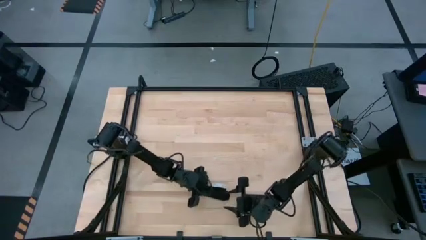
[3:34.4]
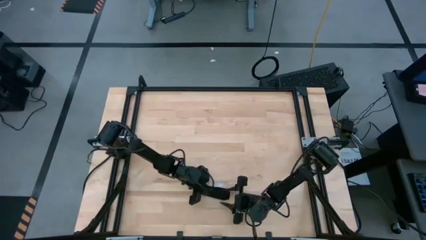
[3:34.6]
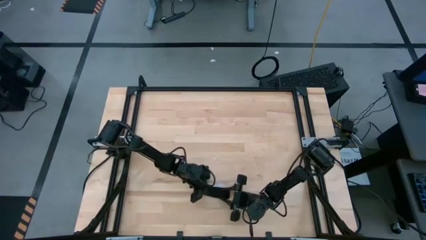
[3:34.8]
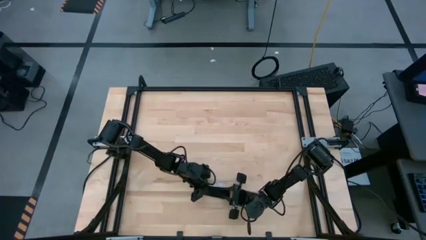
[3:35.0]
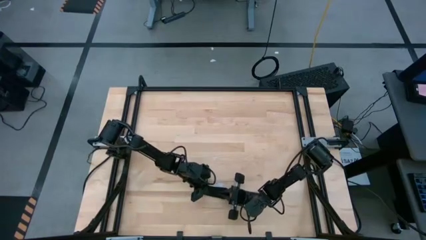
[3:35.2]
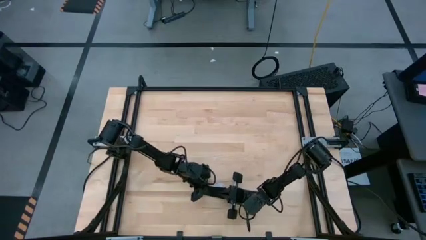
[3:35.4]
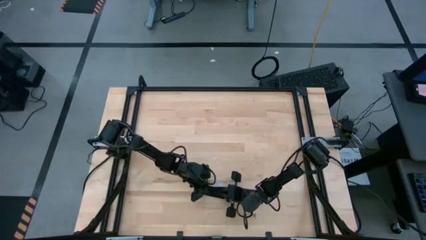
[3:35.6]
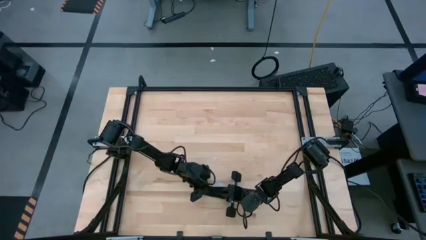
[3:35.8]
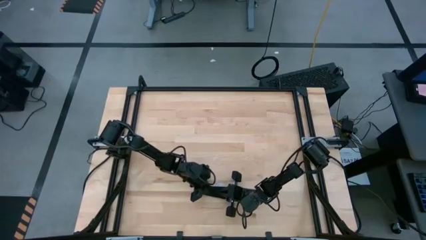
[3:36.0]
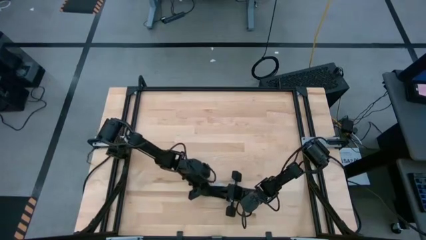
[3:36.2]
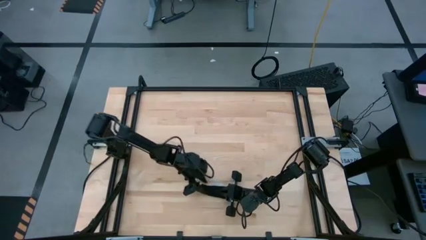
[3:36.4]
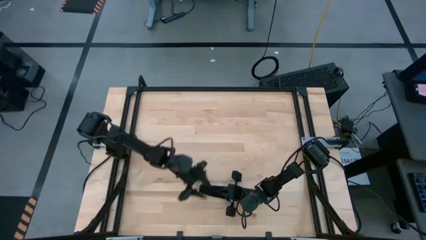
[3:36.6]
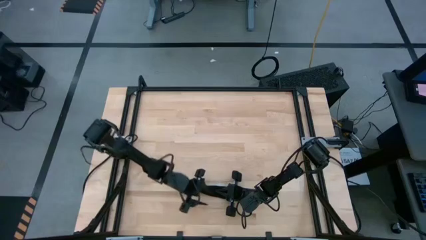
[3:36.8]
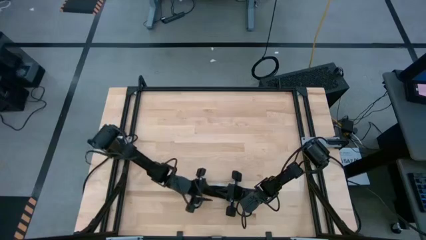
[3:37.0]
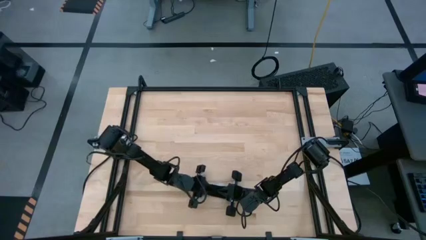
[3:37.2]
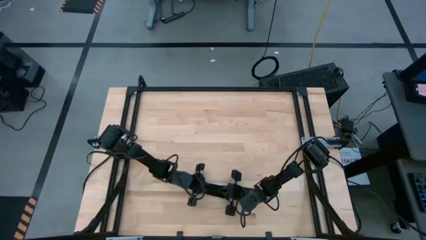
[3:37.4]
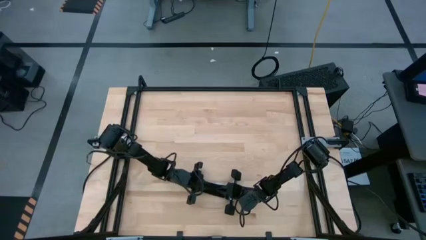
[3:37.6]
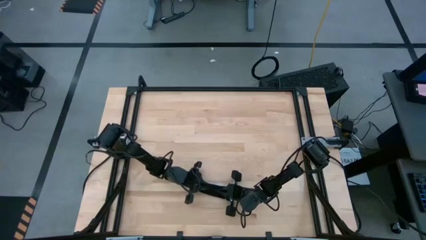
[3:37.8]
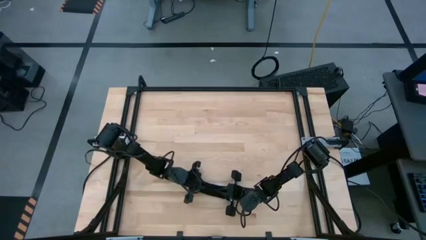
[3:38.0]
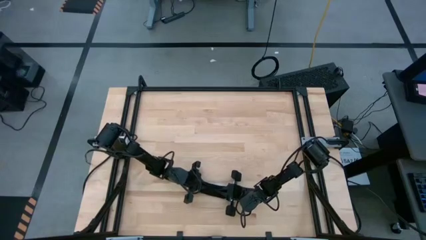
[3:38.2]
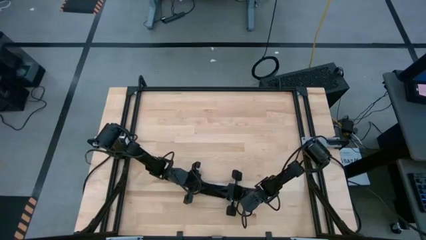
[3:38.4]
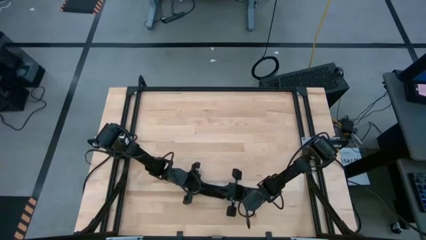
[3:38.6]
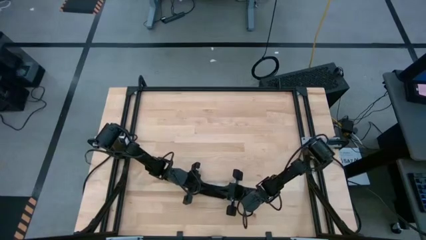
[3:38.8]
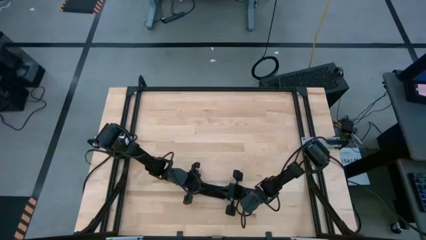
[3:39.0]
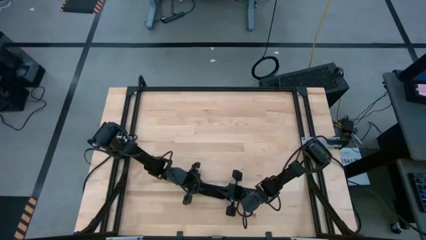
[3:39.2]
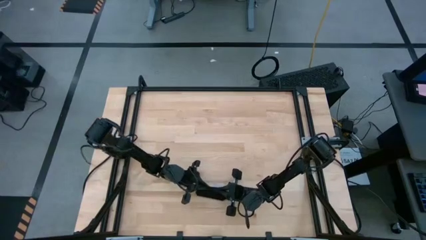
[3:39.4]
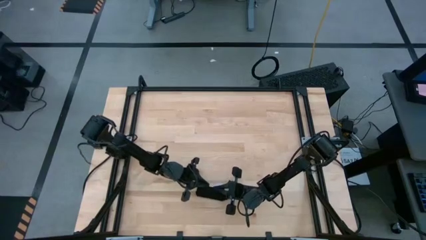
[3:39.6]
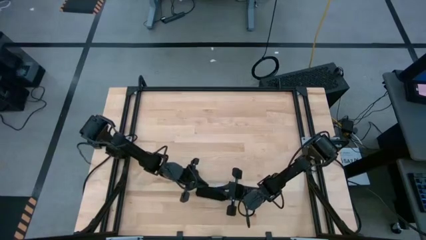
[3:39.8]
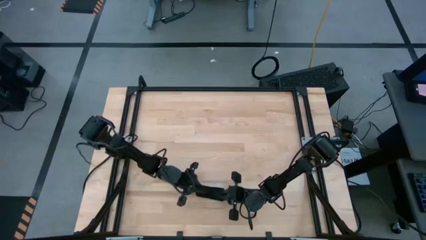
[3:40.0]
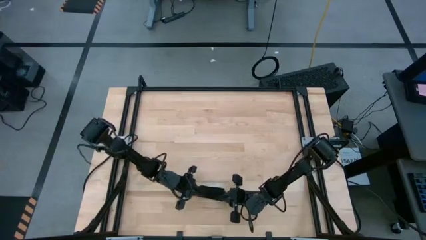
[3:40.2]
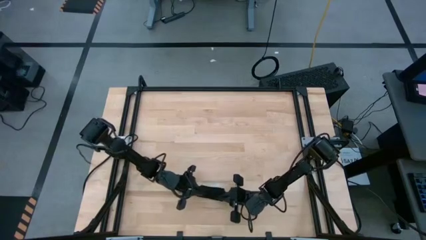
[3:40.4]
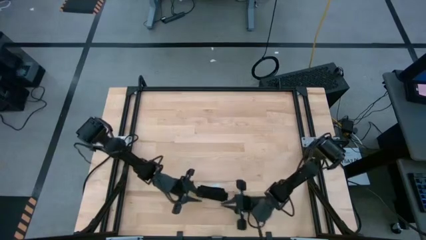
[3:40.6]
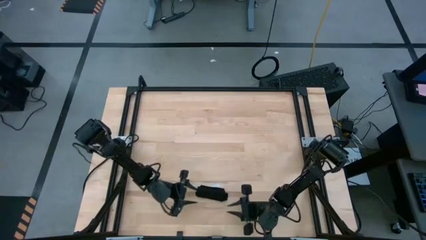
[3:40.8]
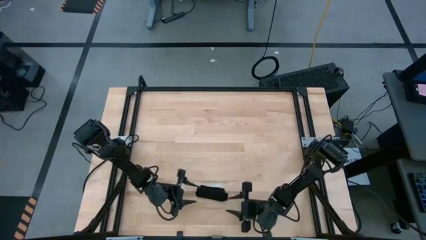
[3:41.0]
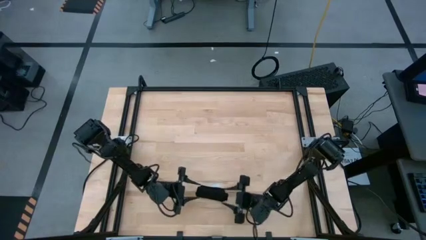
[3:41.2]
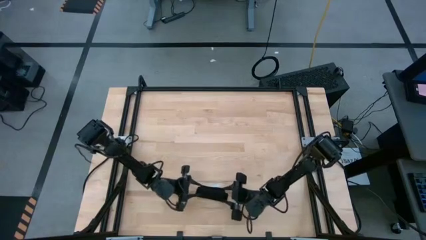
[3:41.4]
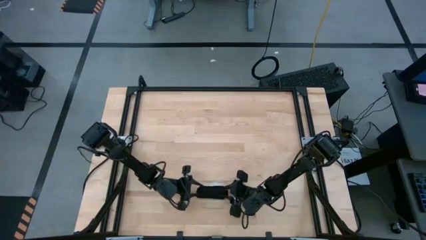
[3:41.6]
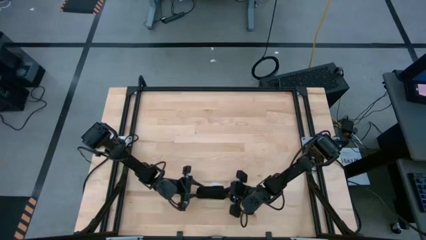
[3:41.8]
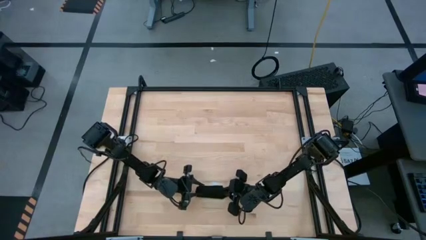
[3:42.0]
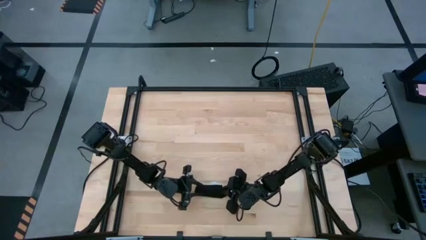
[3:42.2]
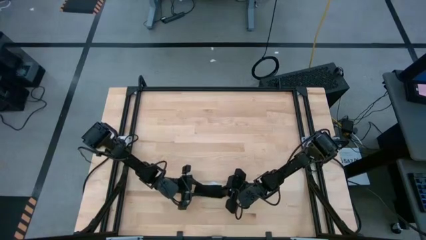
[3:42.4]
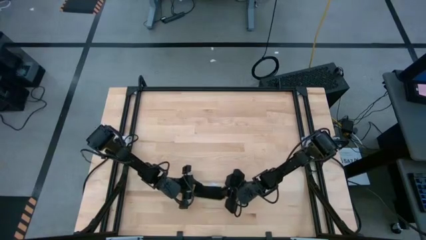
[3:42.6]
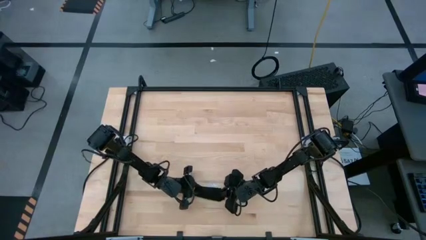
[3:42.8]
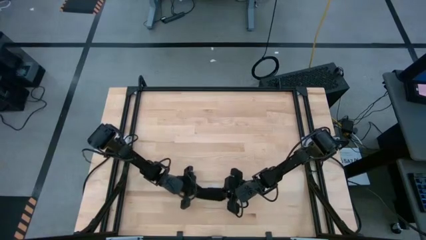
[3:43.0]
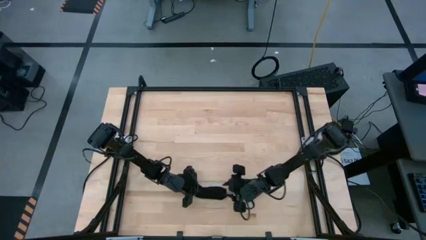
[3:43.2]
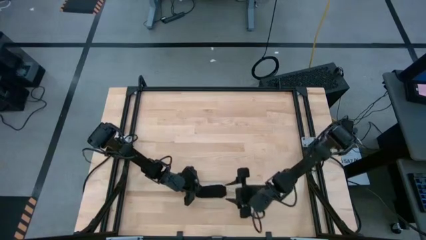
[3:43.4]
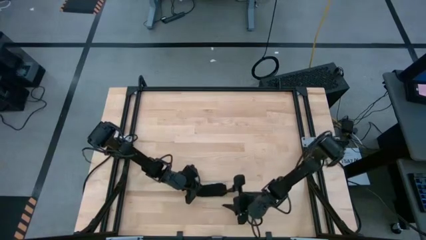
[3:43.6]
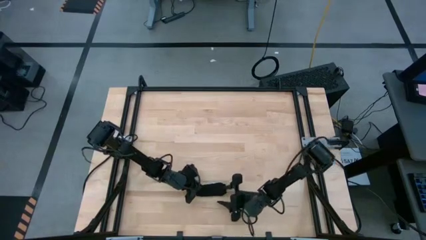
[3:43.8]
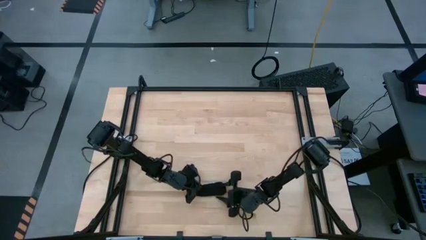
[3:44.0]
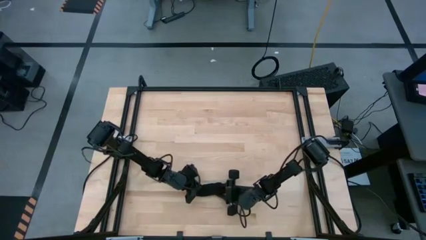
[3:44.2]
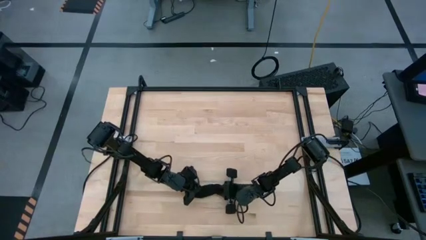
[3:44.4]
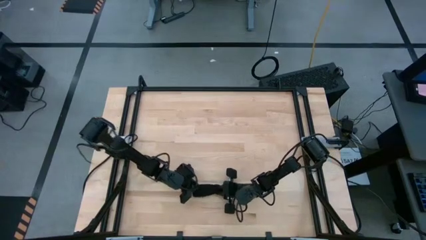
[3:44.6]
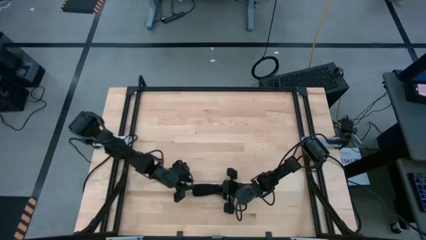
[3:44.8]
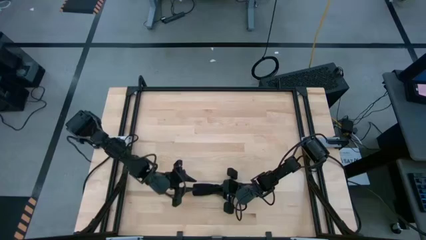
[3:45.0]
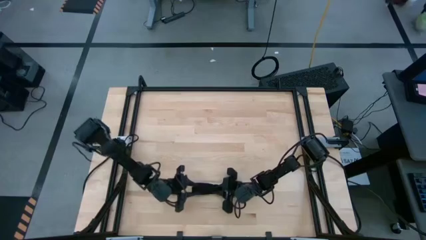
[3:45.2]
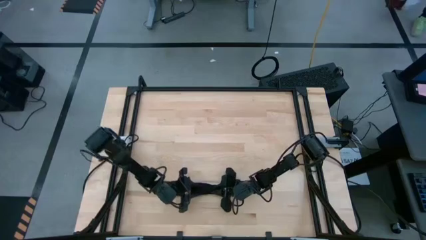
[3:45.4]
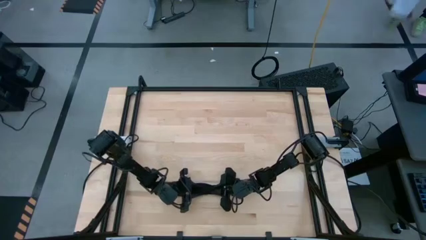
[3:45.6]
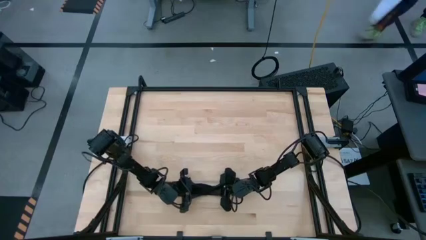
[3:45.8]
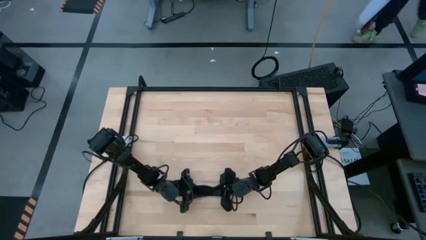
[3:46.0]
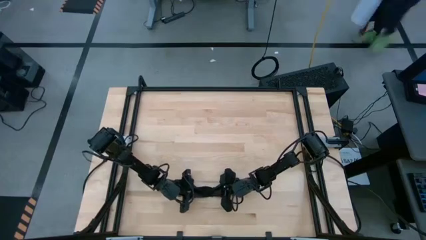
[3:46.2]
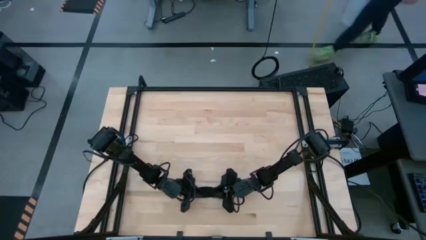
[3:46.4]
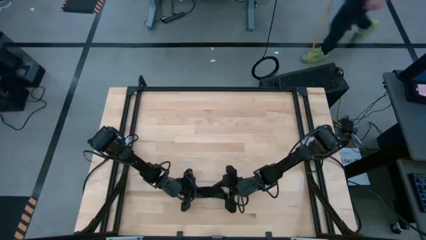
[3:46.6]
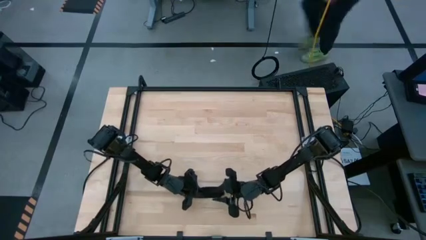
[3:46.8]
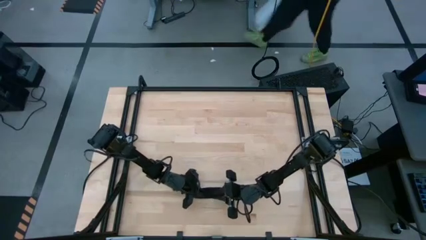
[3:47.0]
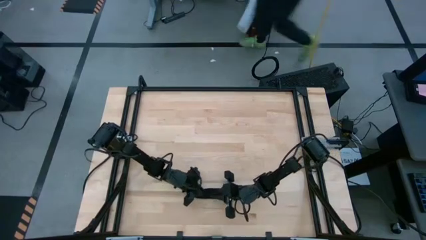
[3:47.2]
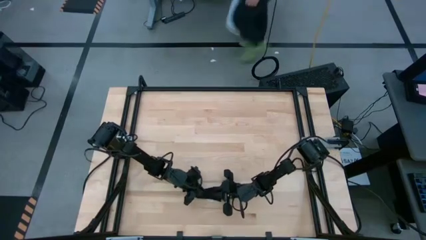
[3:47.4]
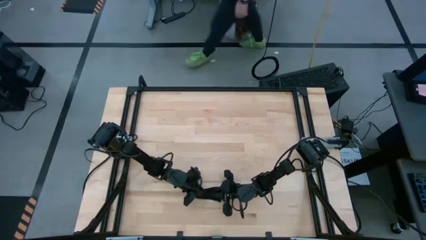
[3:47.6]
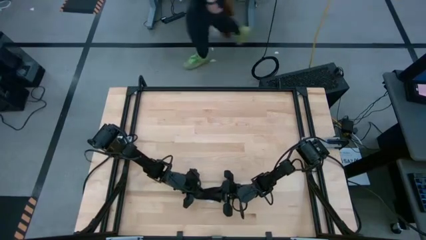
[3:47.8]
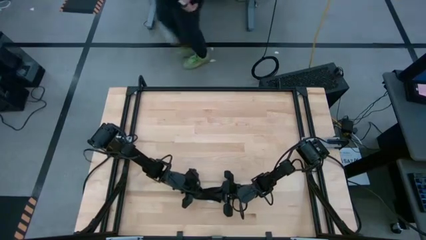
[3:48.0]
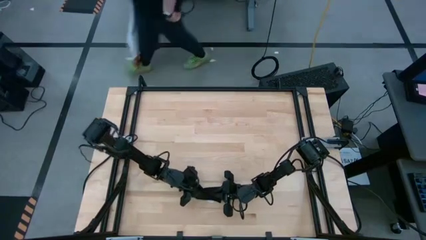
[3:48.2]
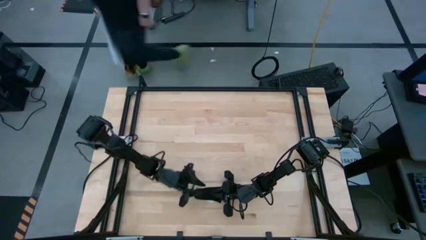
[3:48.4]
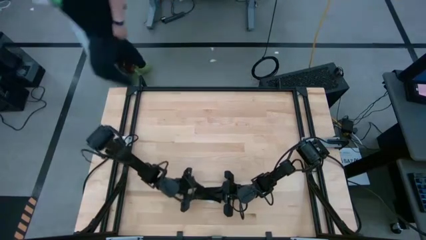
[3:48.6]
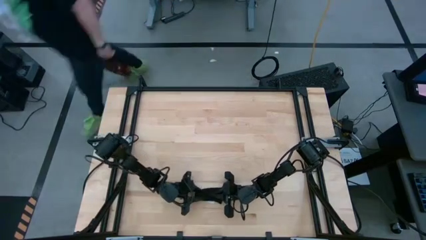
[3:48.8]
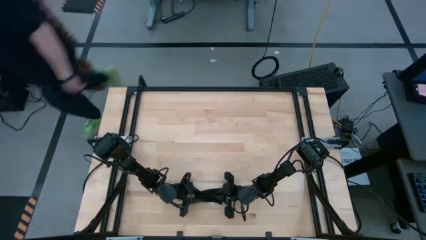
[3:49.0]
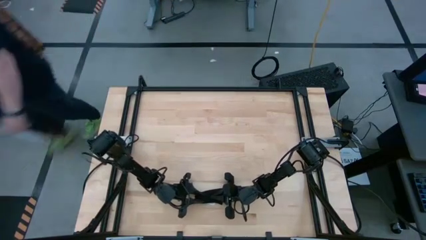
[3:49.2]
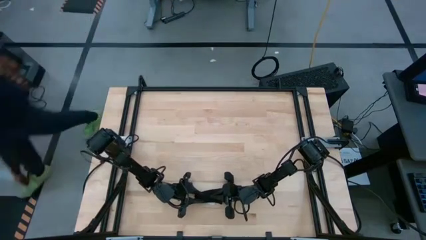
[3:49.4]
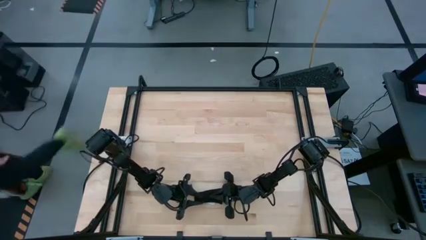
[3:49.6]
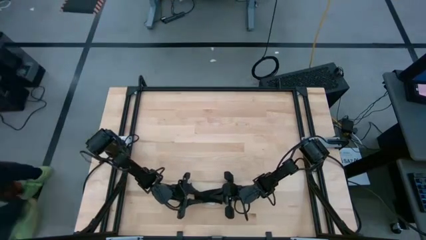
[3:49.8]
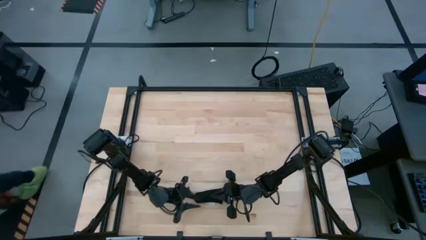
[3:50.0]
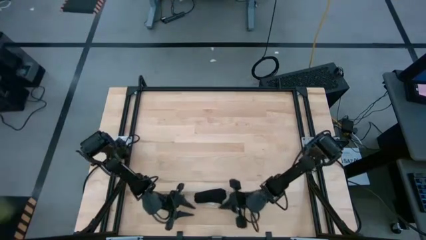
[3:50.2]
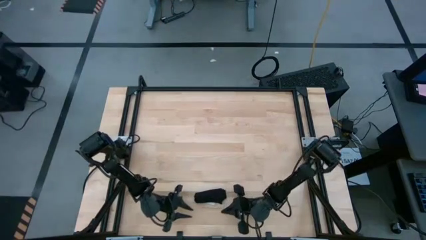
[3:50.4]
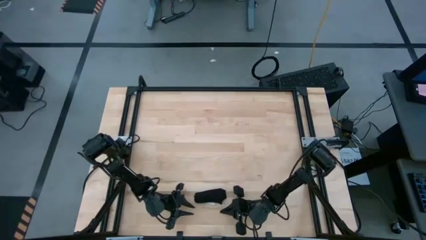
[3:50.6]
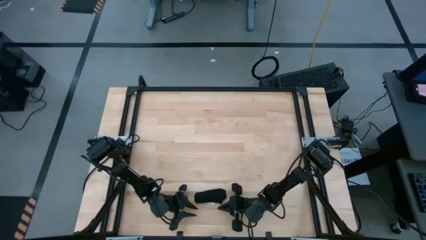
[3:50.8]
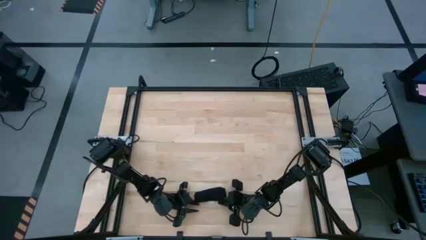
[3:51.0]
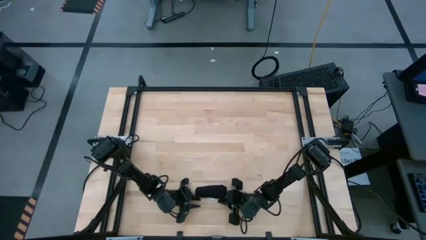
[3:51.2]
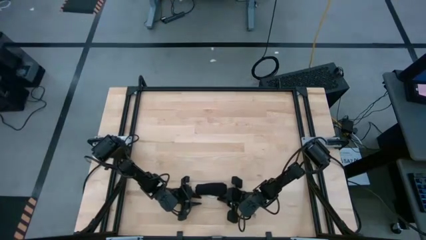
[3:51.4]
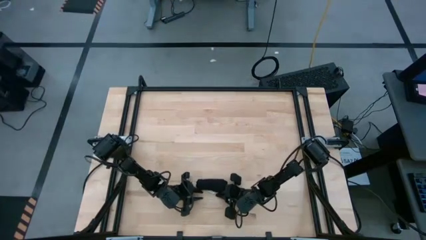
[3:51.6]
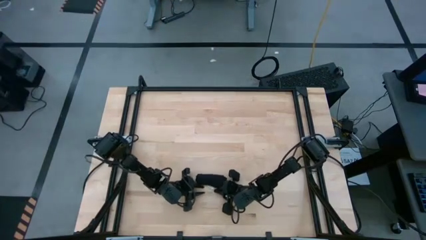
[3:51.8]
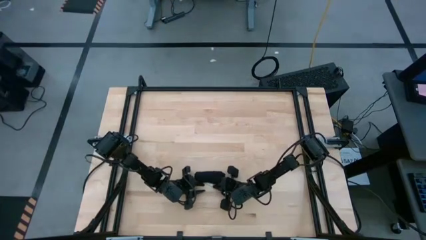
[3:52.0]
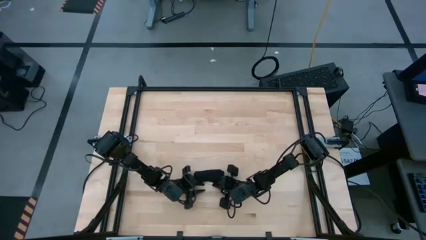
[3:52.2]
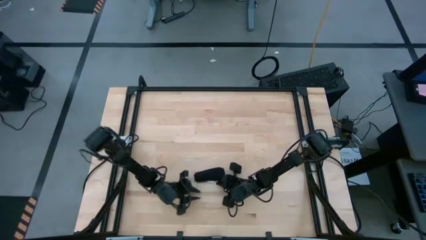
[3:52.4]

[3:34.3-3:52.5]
Task: Roll napkin
Roll the black napkin
